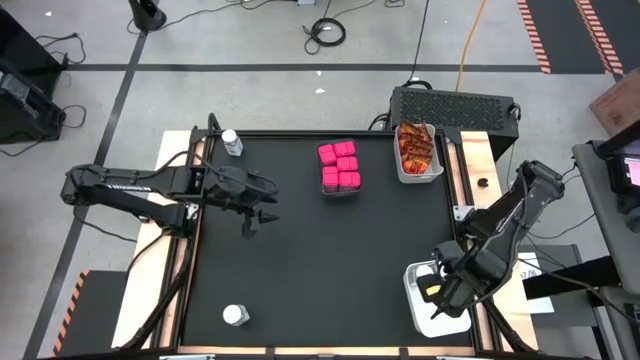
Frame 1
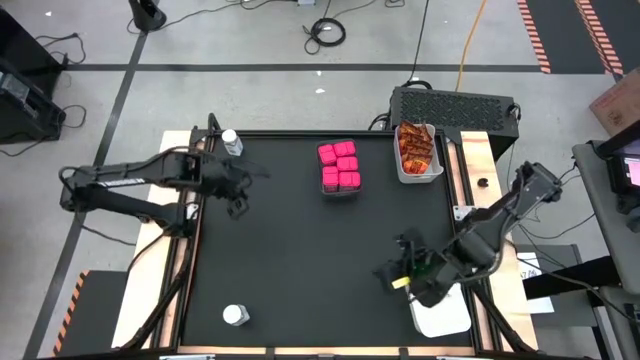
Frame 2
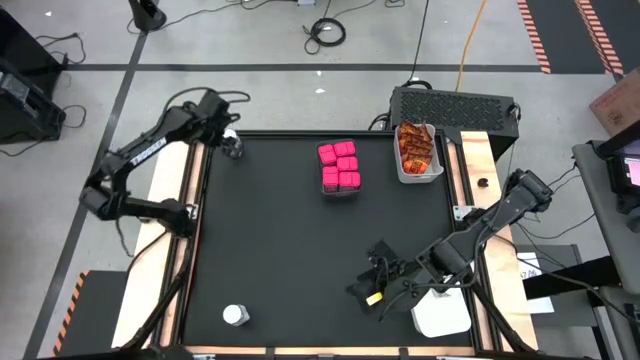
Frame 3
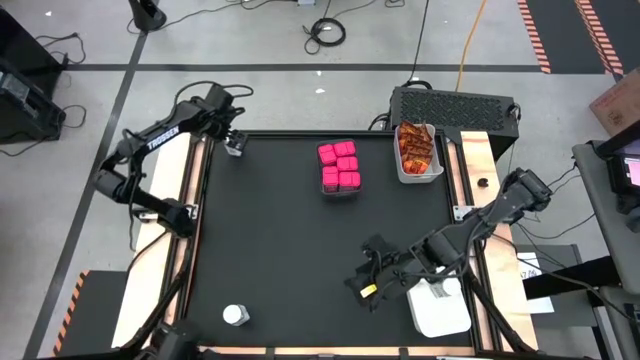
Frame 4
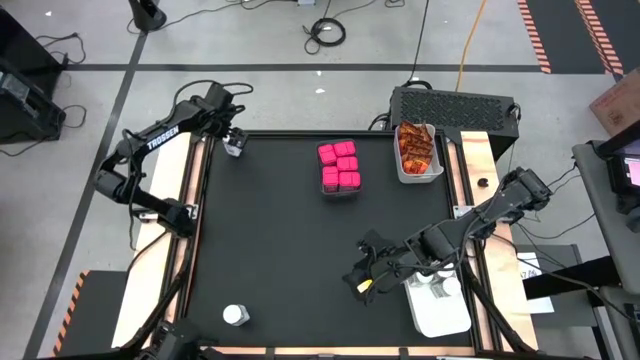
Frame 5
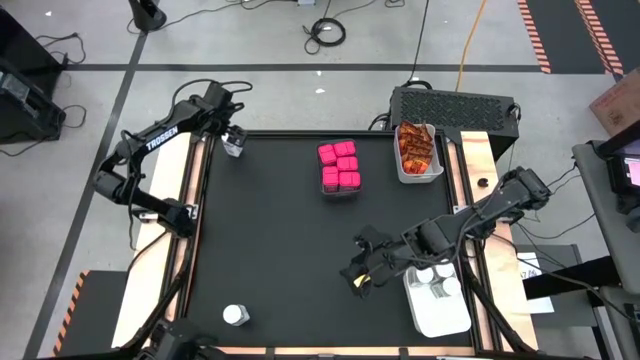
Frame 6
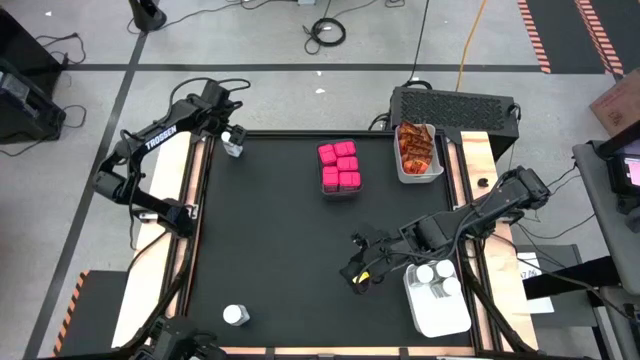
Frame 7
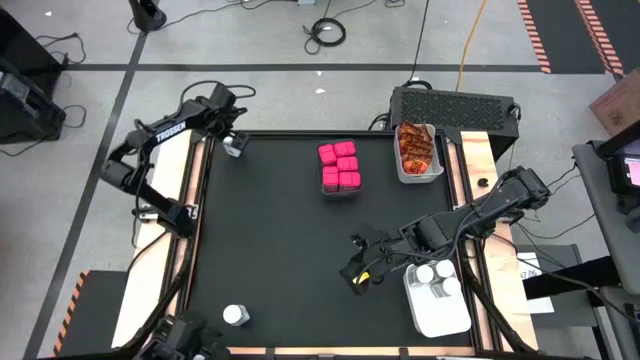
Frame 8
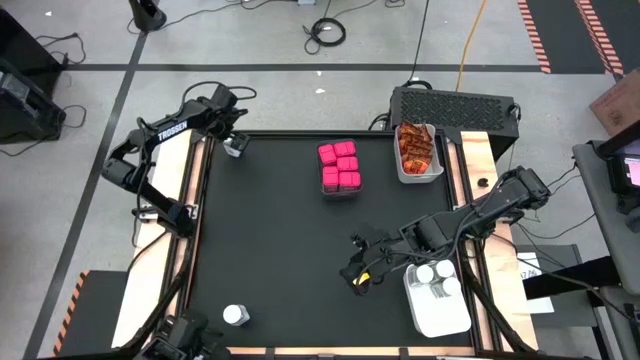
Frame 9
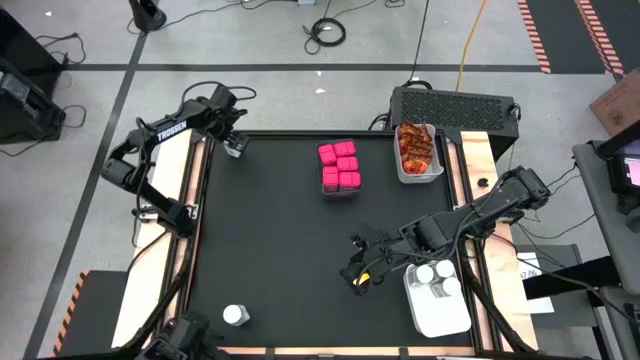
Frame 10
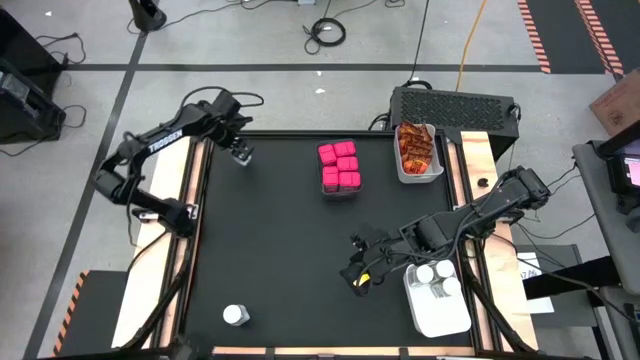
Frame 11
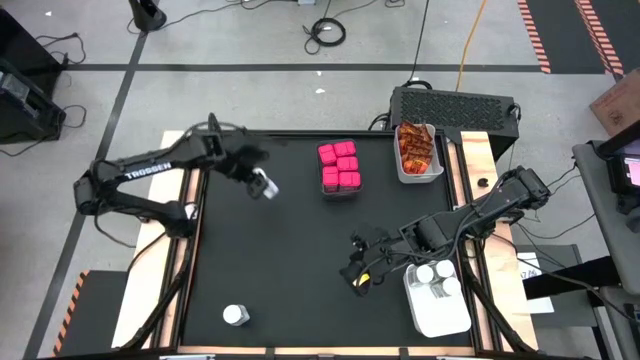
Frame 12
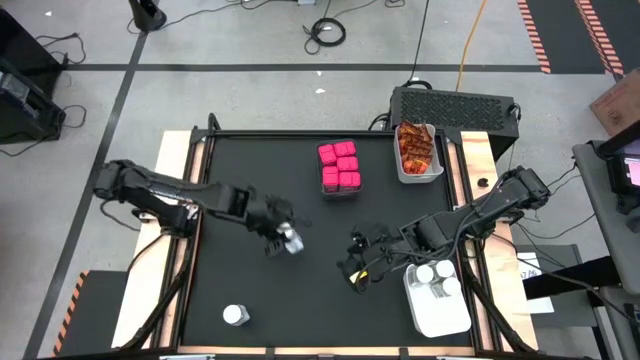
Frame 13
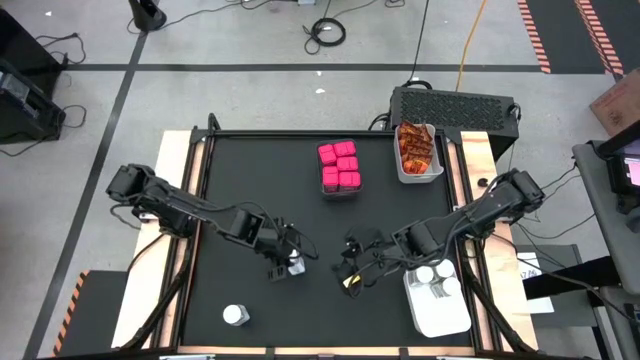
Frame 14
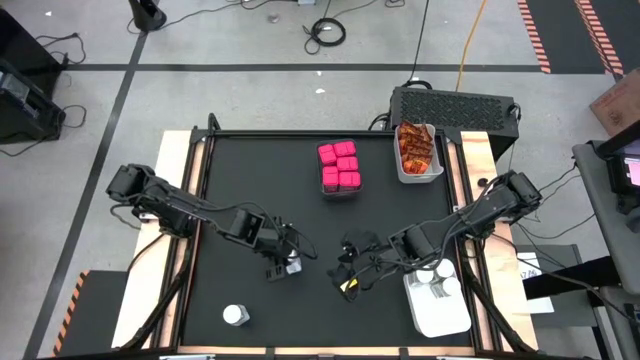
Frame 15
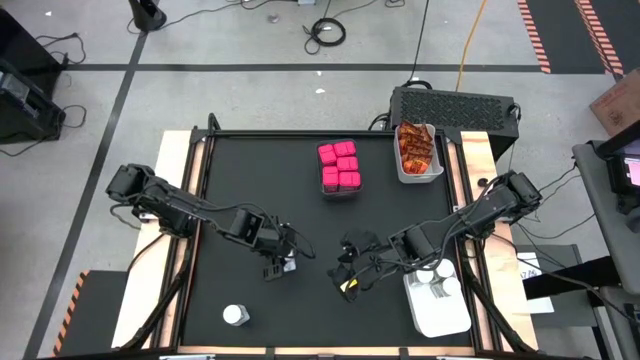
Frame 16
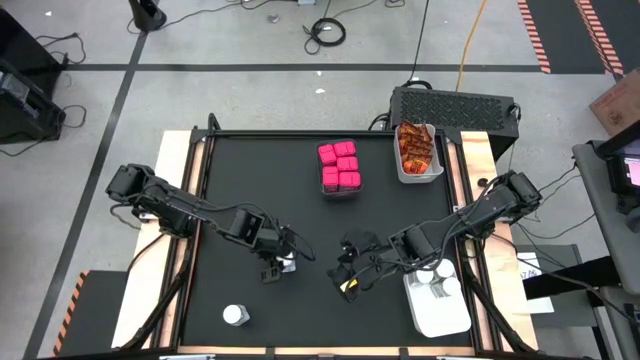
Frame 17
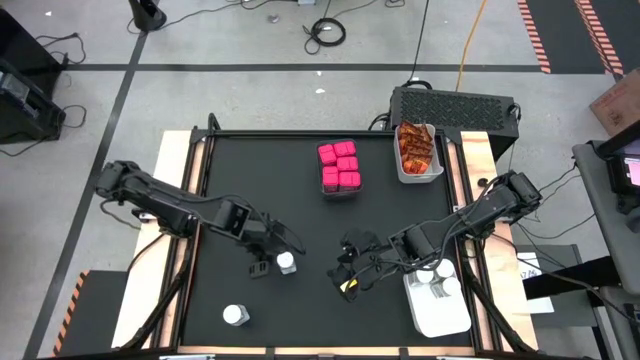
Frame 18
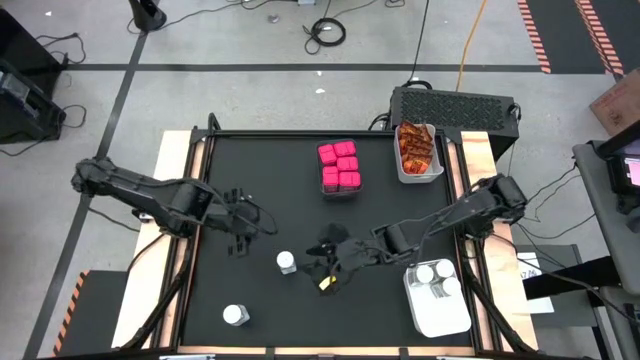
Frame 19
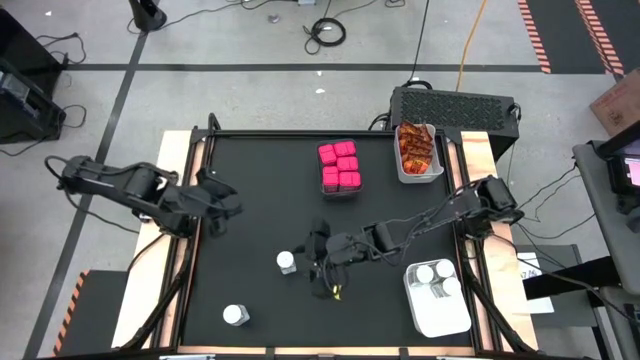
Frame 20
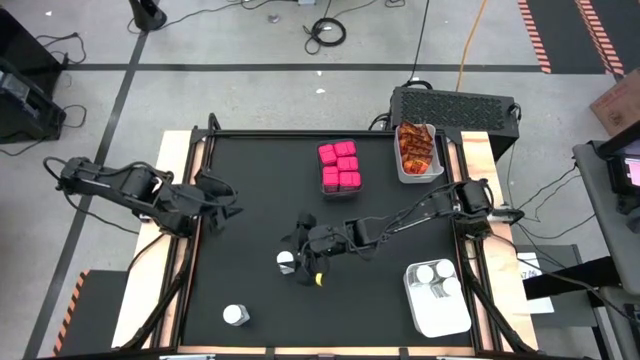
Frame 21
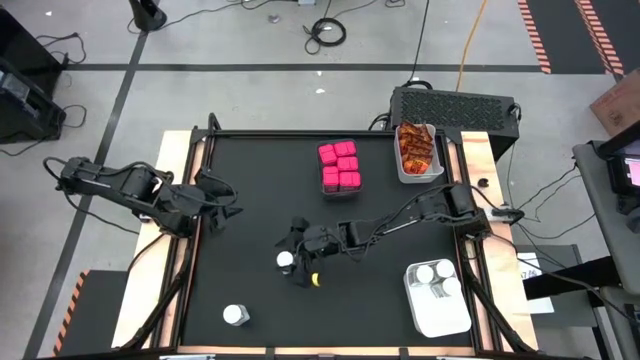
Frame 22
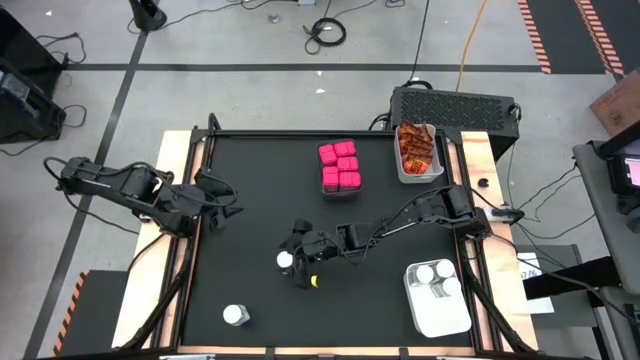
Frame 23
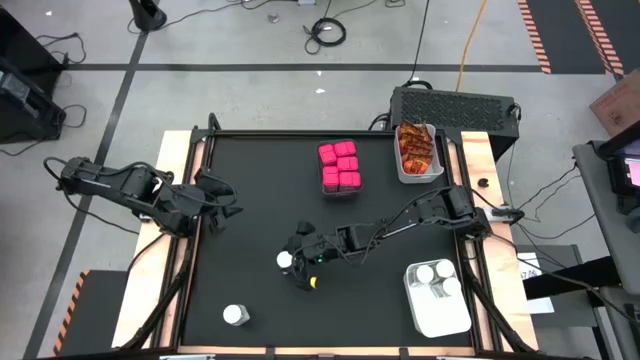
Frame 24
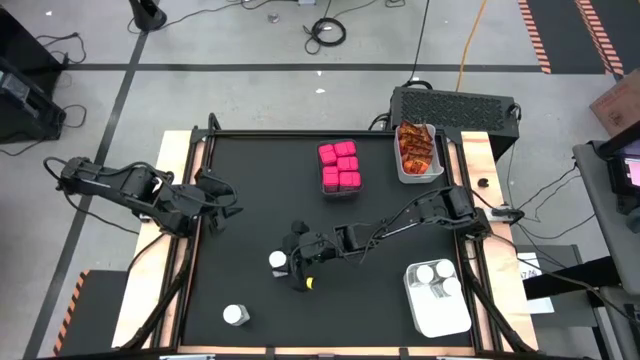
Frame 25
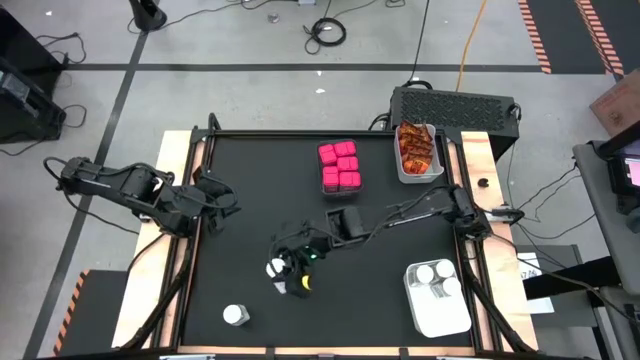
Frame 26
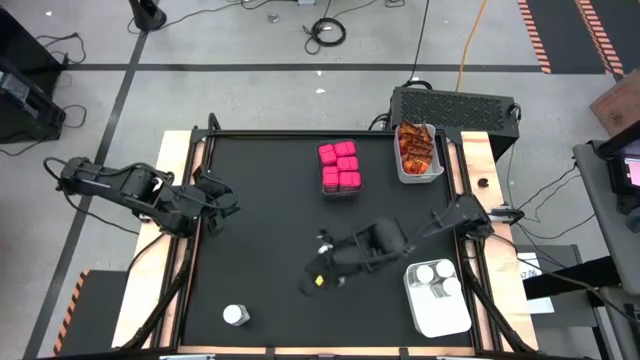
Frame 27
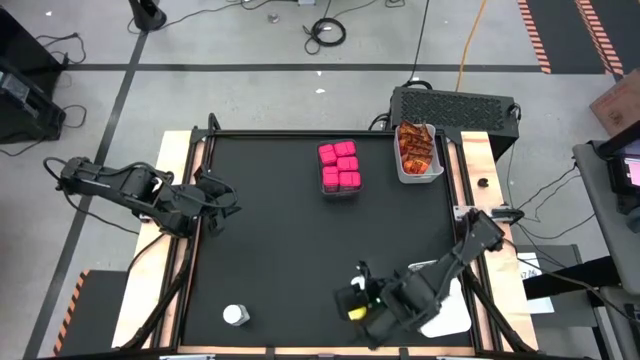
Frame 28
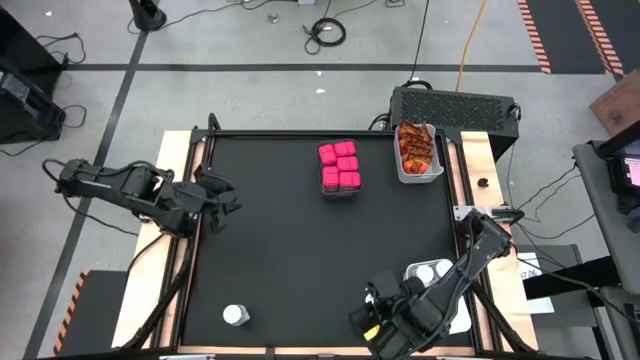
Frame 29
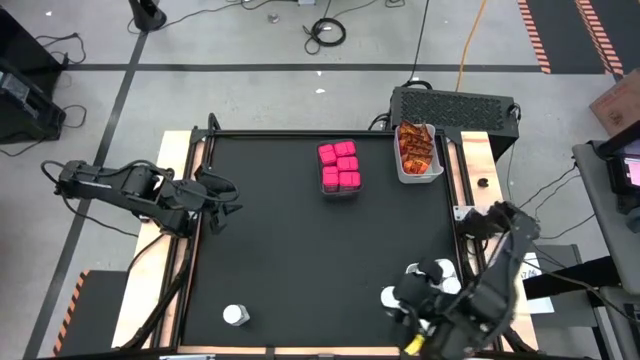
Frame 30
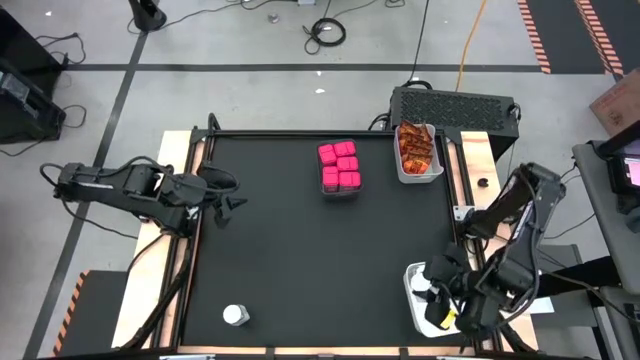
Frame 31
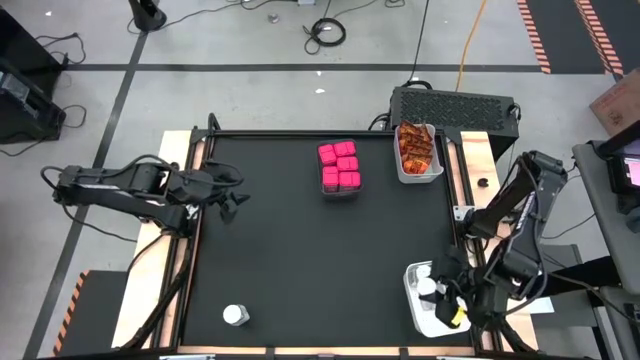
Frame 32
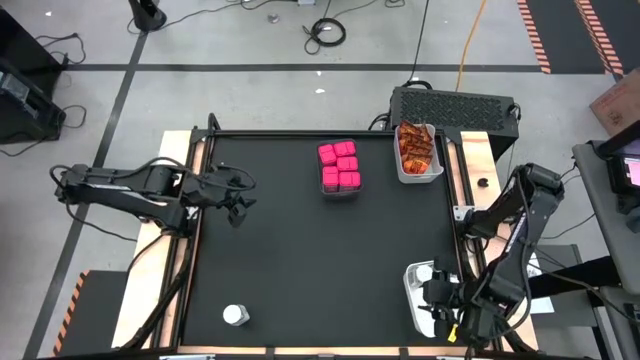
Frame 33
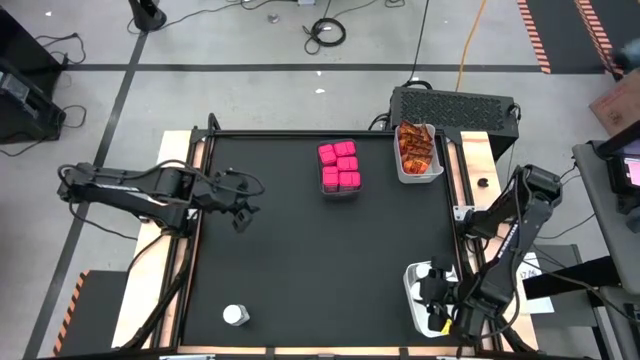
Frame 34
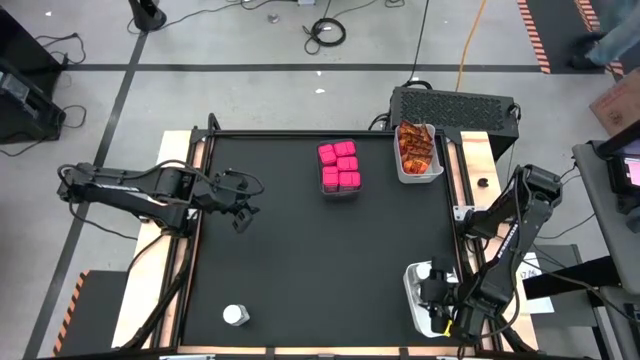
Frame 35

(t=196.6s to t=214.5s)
Task: Sort spices by type
Put the white seasoning bottle into the bottom white bin

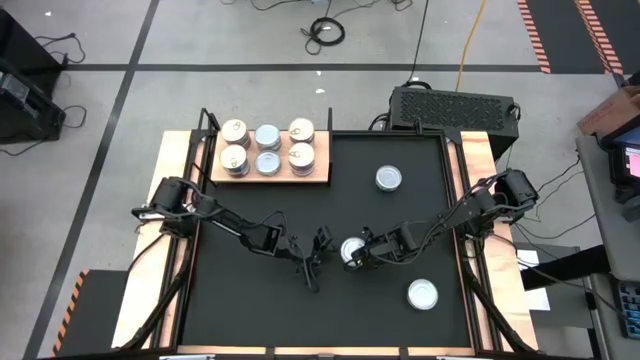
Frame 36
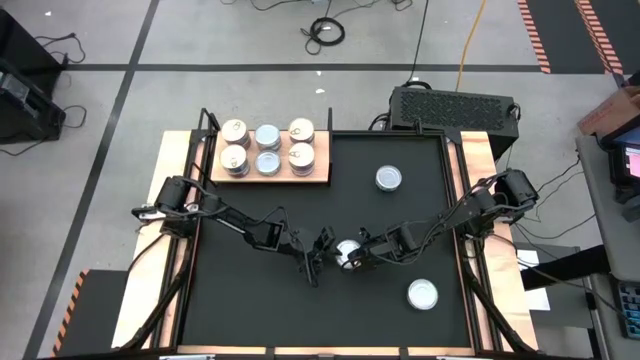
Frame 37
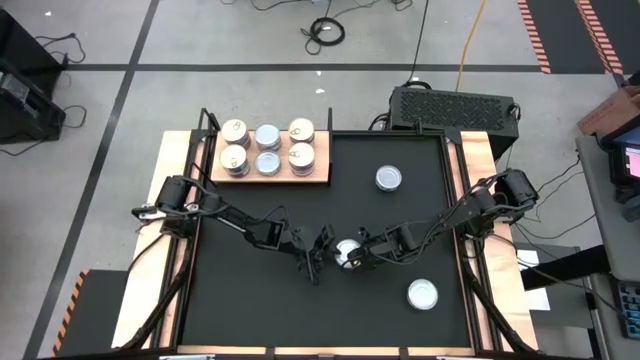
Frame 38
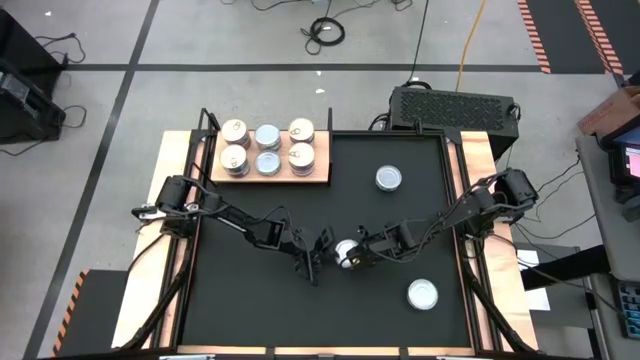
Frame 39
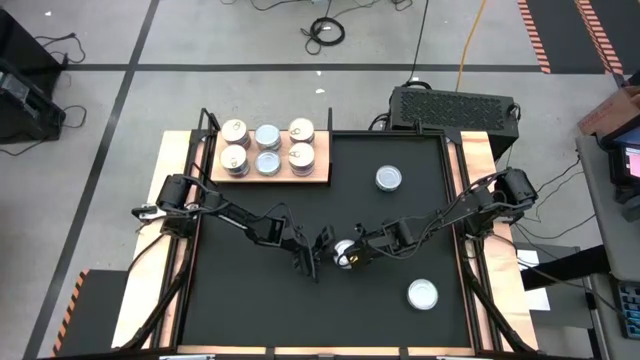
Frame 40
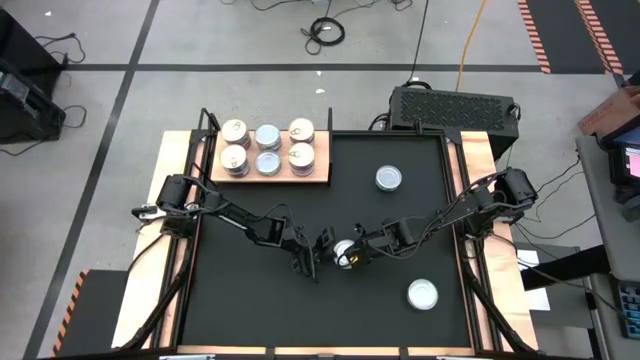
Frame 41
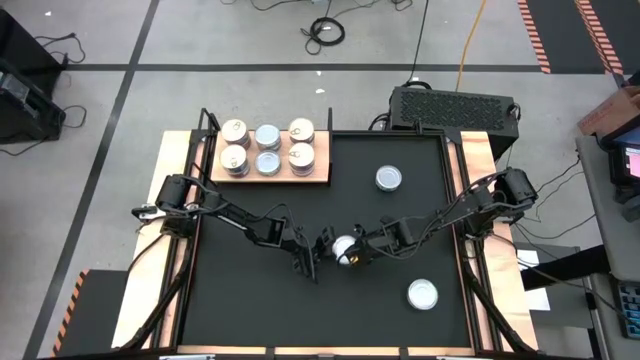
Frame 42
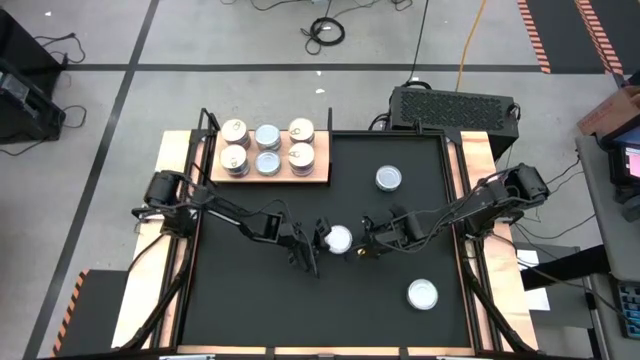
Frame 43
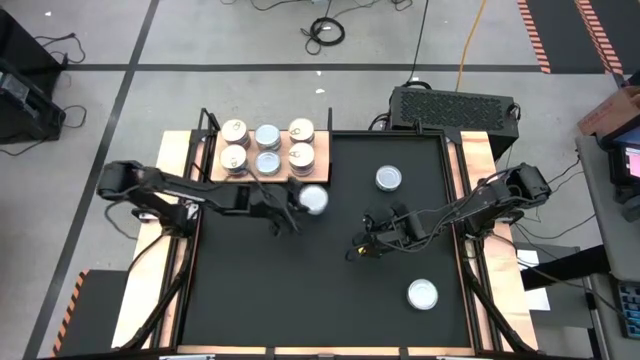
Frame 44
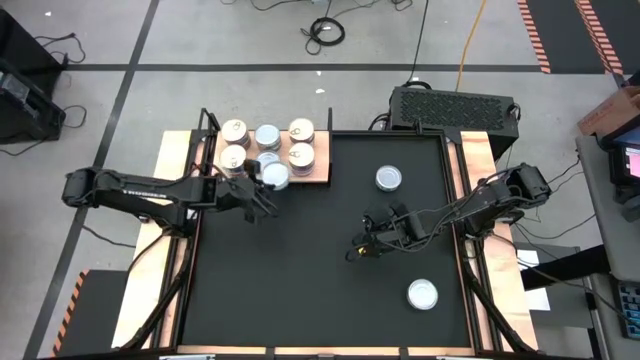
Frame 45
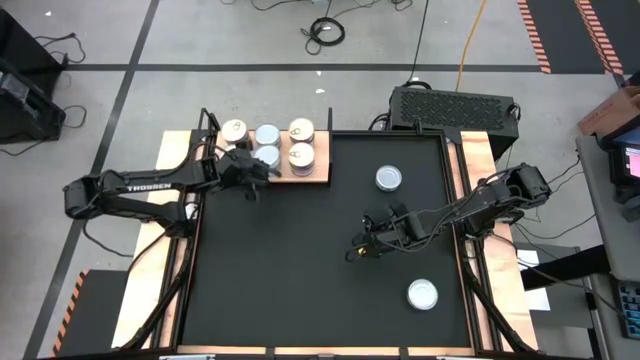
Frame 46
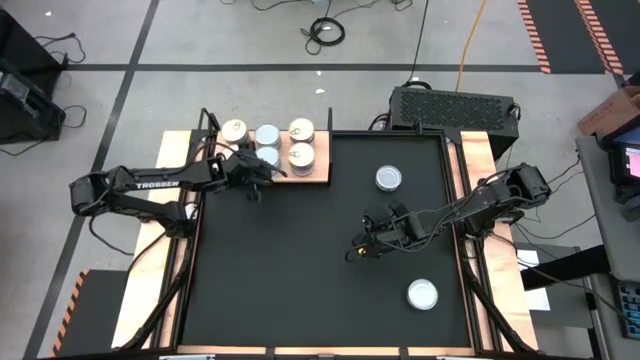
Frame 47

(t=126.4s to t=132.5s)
Task: Stack canned seafood by type on shelf
Stack the green tuna can on top of the green tuna can on the shelf
